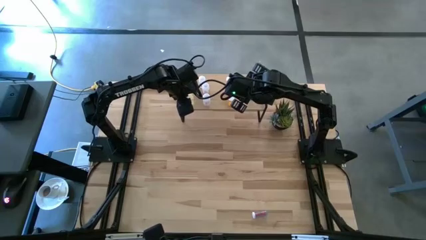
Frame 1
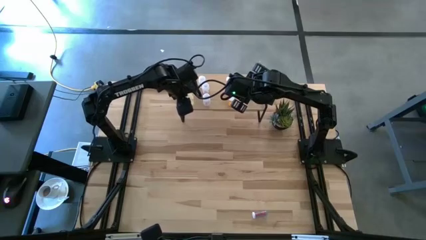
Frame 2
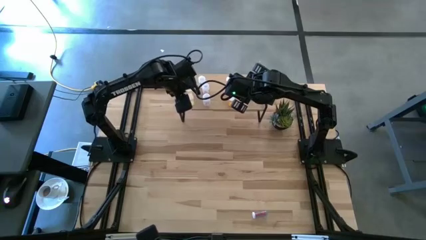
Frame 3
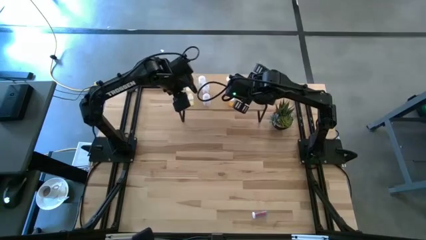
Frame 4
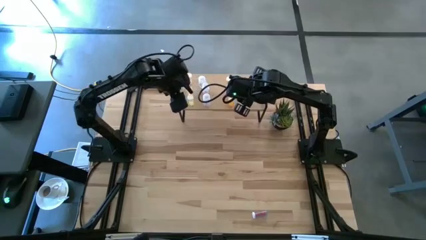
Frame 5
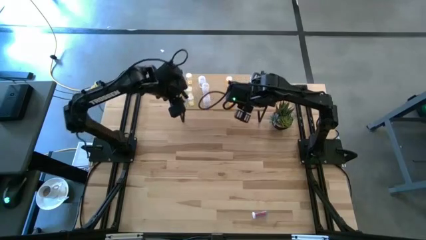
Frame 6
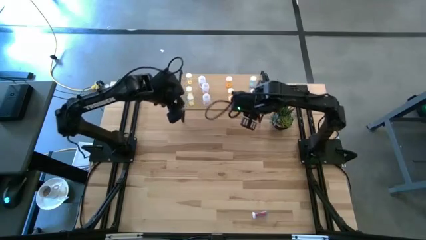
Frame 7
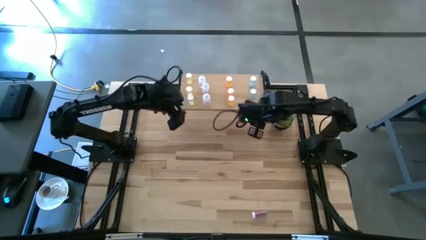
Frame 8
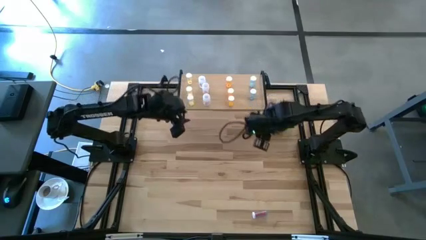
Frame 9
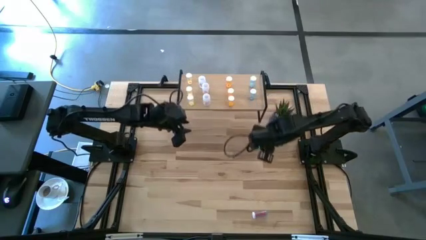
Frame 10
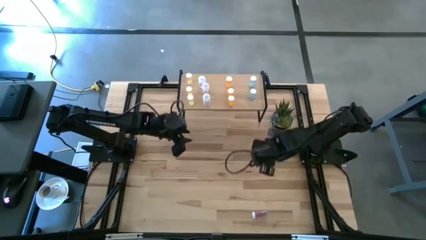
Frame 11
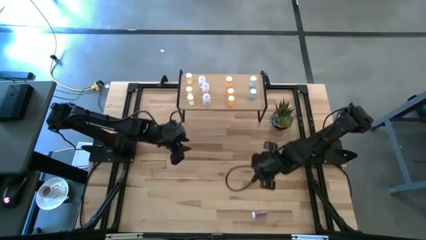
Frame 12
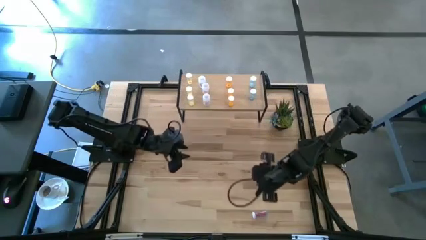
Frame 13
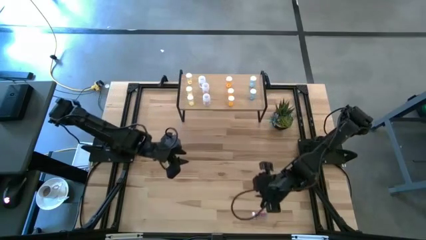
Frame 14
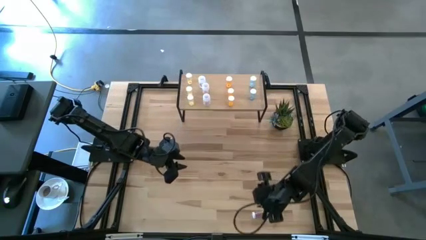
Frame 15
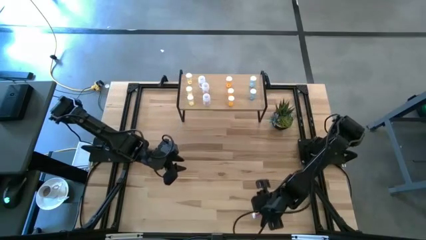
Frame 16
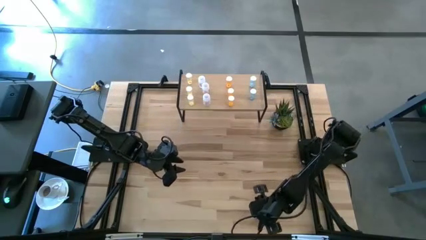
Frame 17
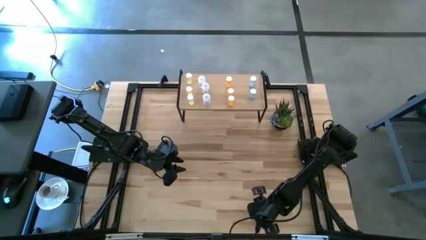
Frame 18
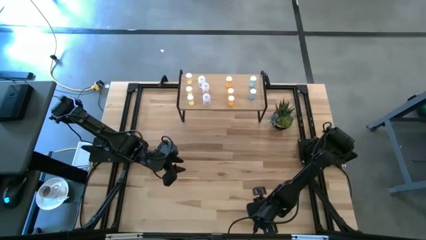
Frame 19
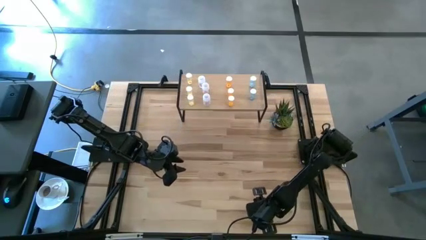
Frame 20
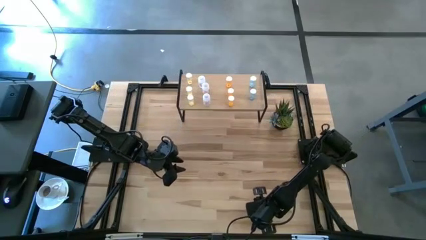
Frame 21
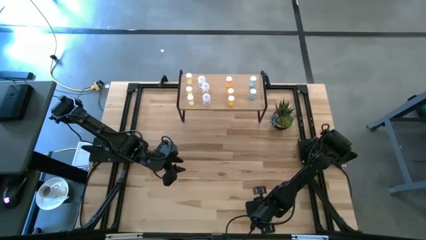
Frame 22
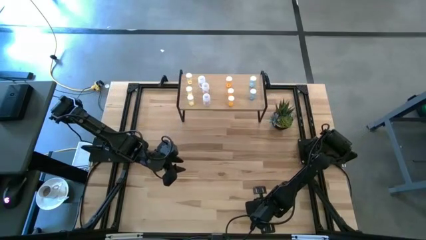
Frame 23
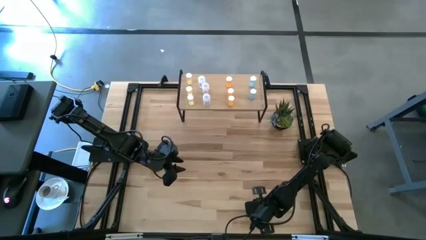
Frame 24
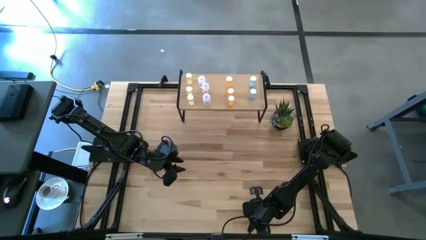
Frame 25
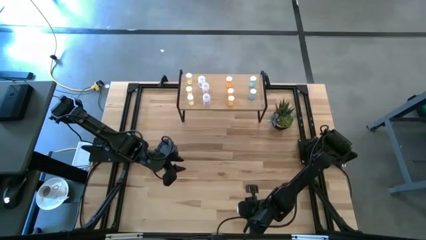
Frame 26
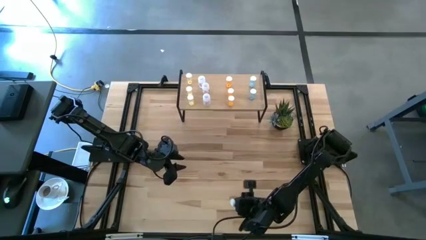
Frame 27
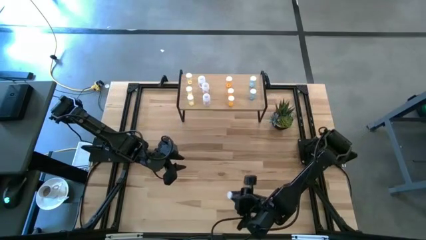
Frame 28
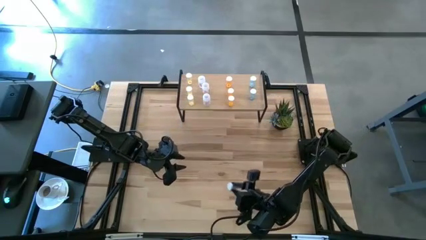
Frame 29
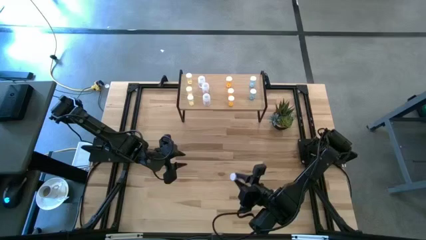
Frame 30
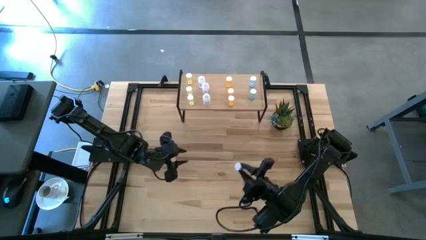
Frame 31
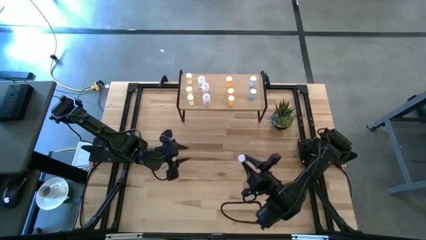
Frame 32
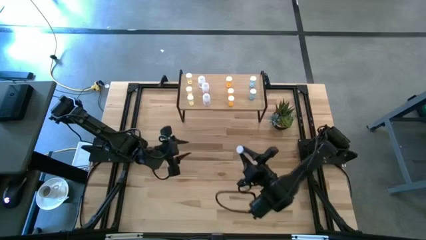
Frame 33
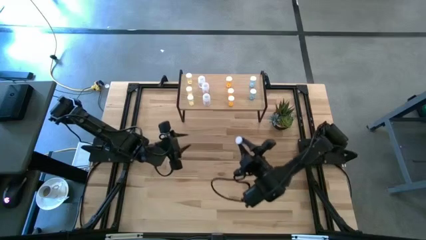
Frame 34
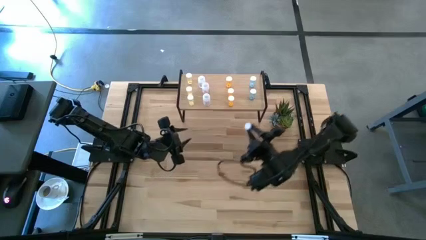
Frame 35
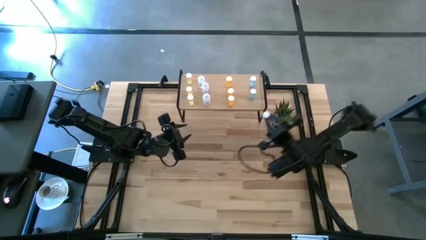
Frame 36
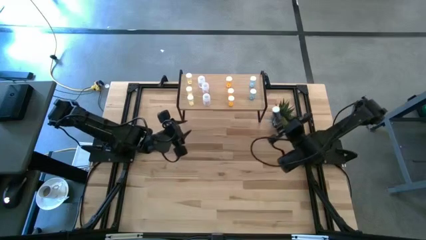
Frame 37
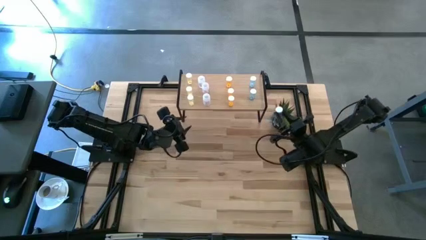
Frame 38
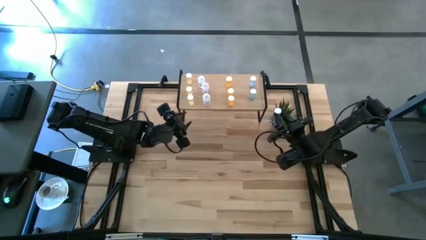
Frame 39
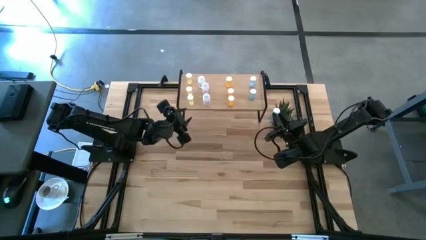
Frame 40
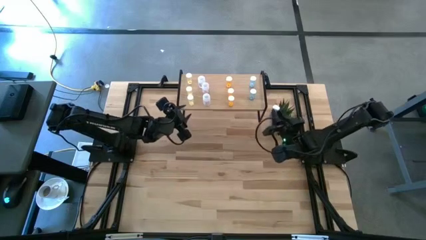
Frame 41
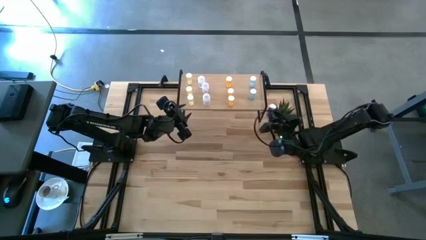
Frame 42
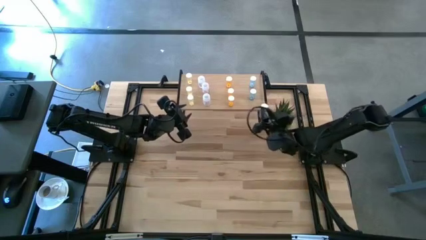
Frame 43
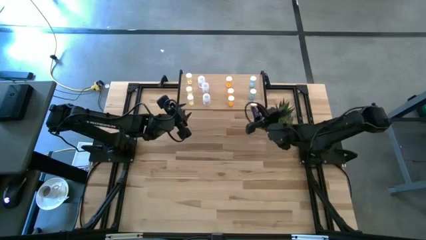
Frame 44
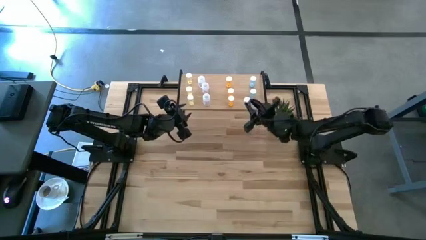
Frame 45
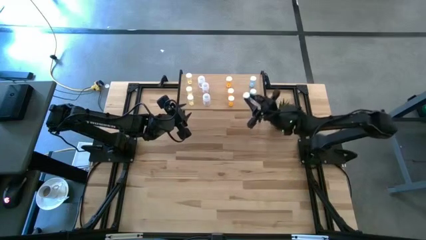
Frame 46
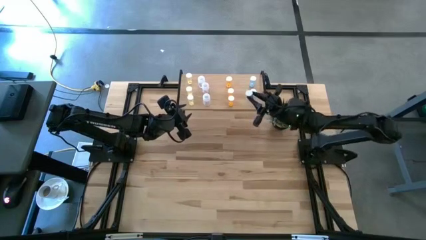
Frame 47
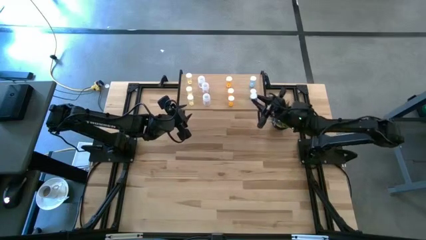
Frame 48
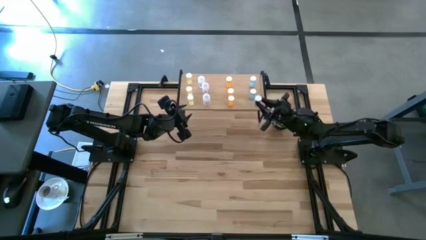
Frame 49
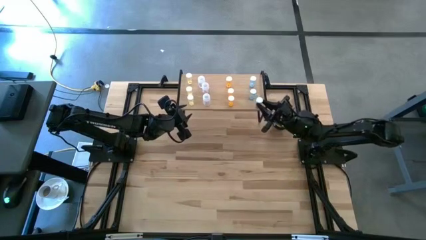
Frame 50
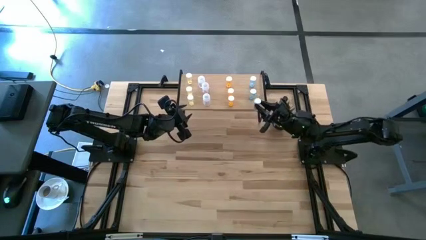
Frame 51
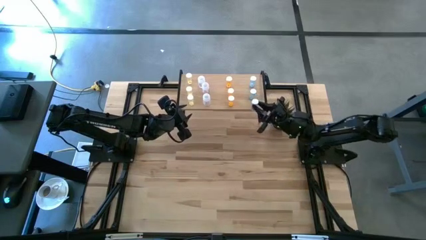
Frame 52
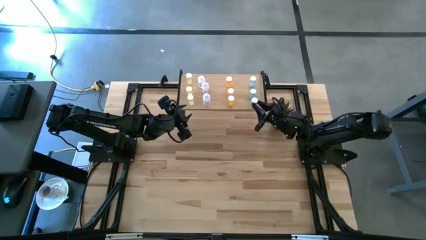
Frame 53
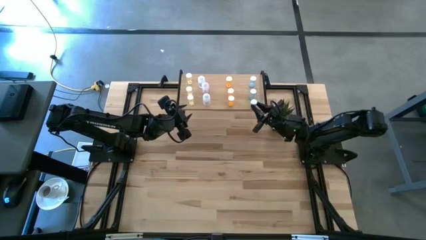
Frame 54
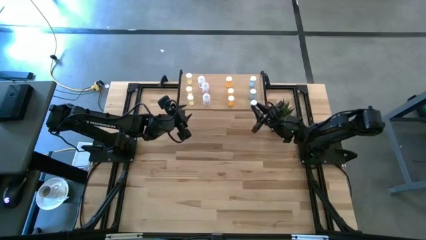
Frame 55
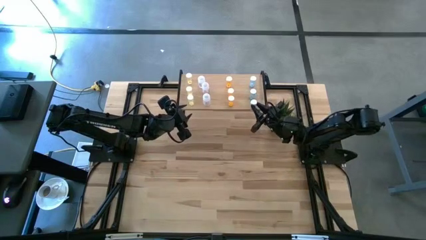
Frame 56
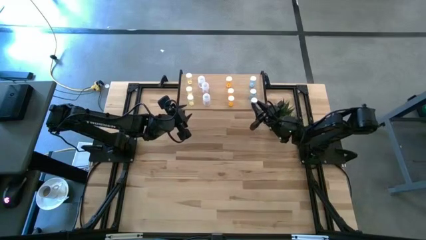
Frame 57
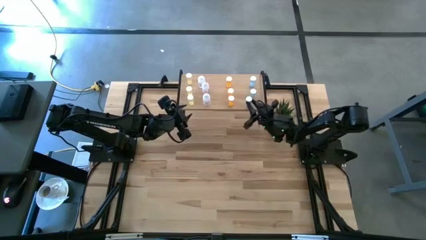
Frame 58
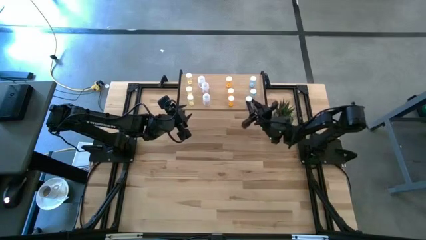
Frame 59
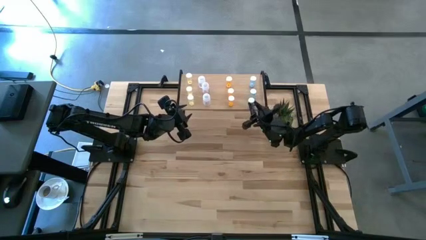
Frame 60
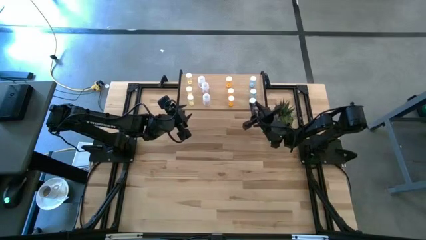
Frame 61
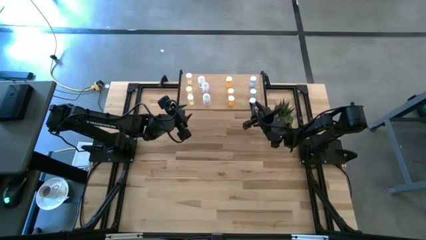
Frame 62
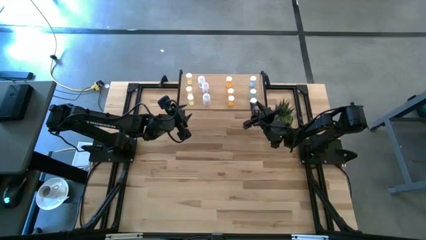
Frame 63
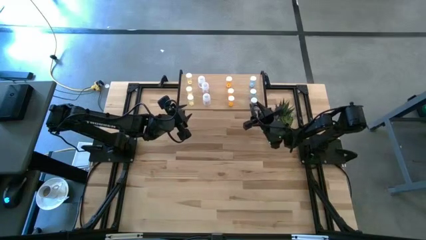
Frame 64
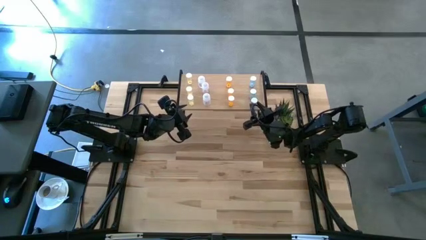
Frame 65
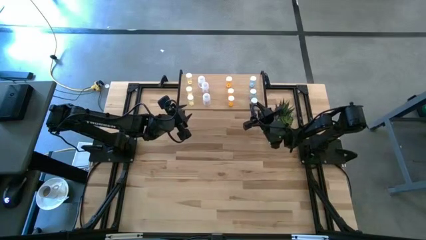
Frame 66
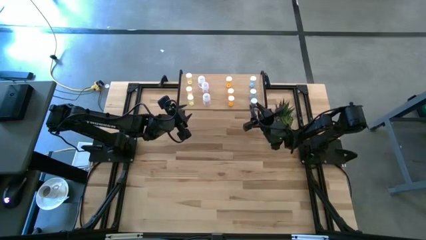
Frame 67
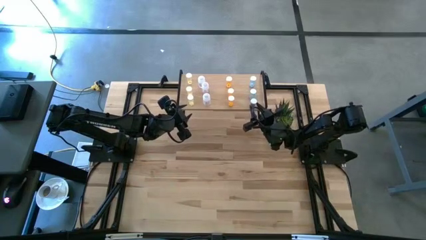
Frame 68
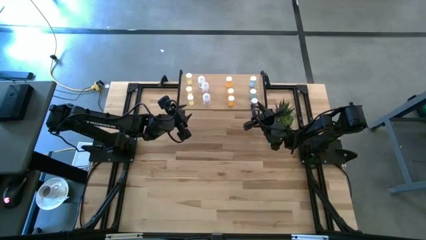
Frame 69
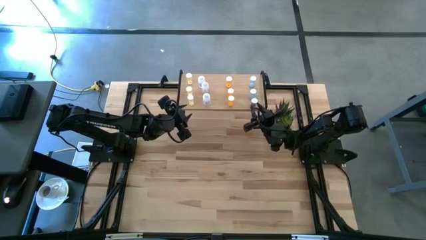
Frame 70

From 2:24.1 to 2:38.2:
Task: Pick and place medicine bottles onto shelf by color
Put the blue pill bottle on the shelf aligned with the other blue pill bottles

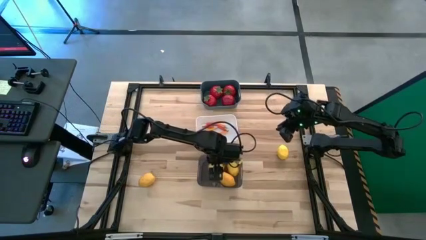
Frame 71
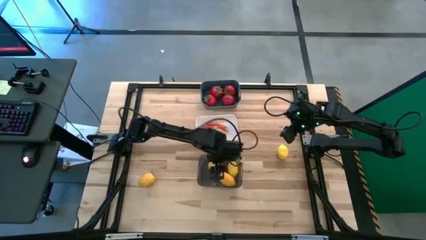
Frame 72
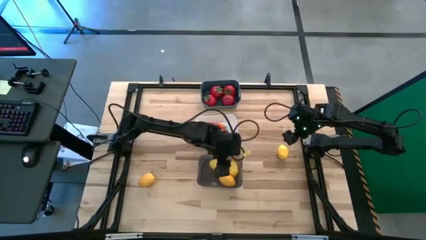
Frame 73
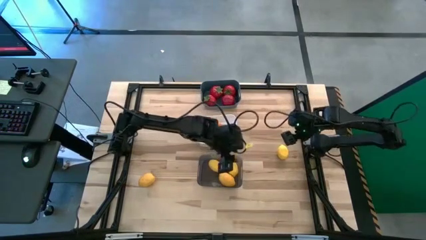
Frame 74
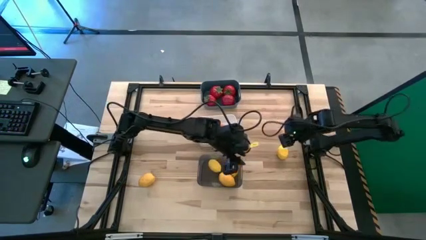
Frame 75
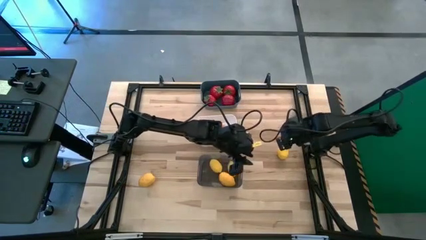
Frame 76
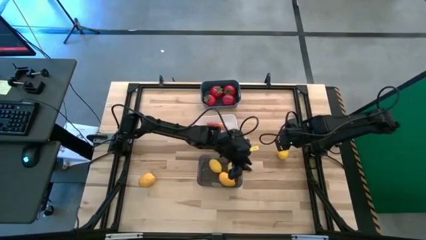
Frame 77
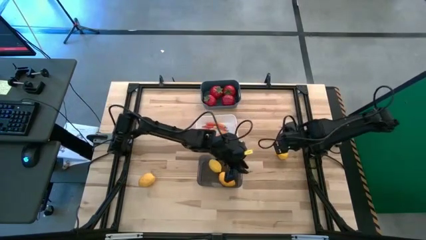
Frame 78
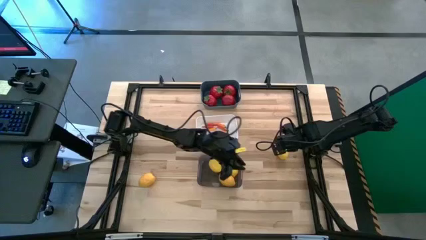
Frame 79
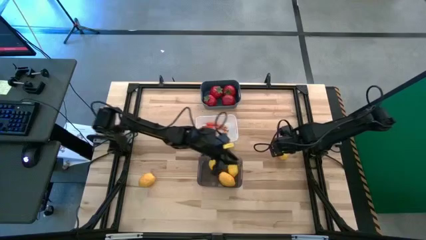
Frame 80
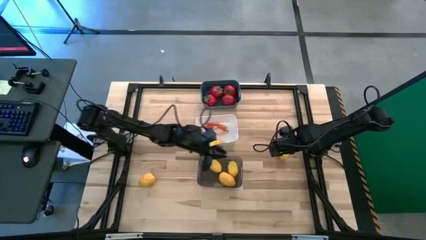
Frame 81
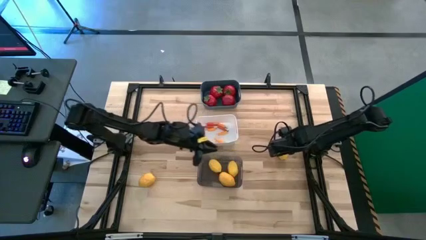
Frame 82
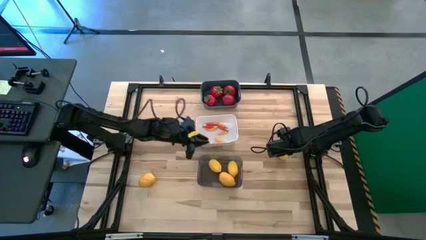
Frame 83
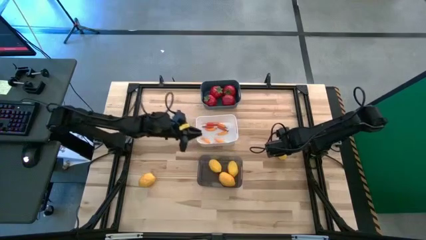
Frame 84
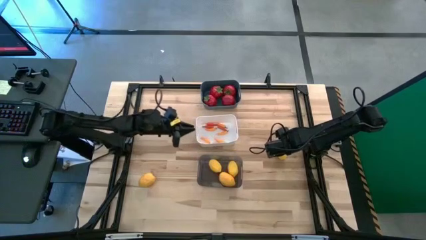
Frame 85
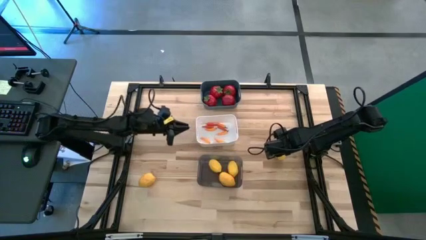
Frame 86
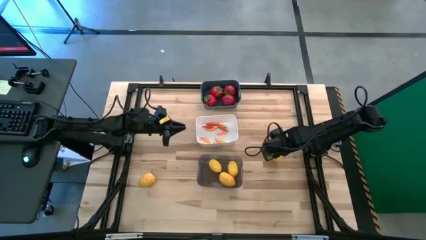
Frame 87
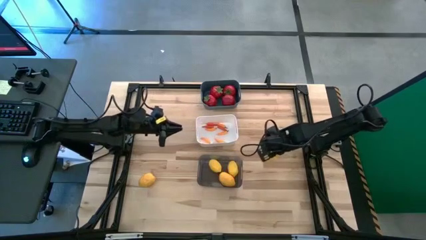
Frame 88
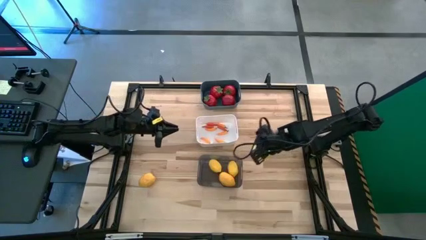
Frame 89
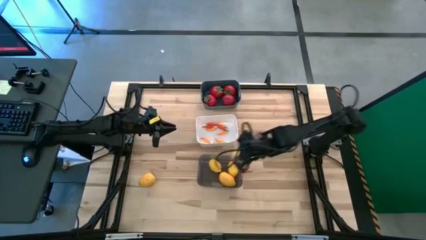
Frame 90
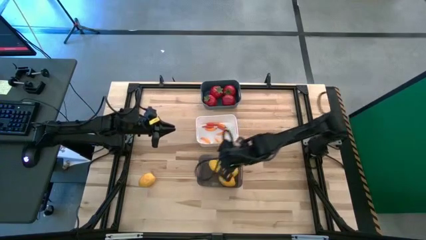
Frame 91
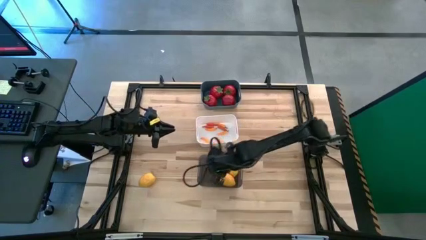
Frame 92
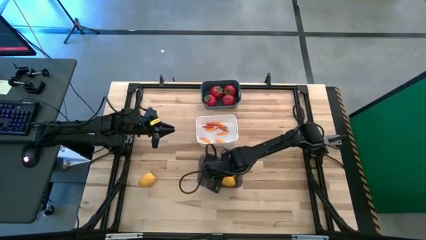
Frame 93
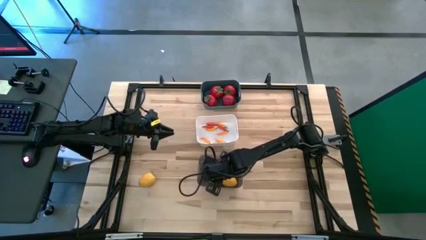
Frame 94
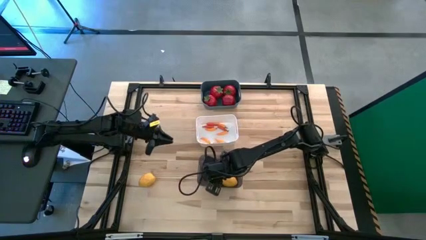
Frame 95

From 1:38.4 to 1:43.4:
Task: Sort produce into baskets
Put the yellow lemon into the black bin
